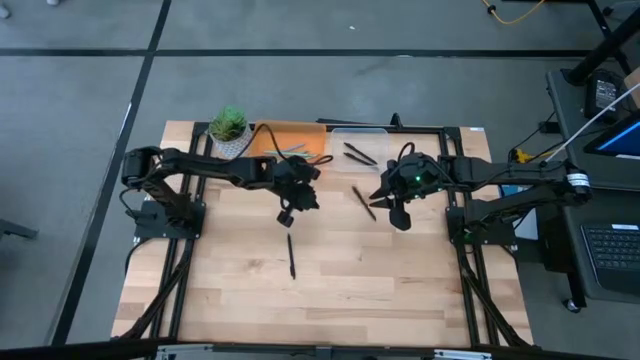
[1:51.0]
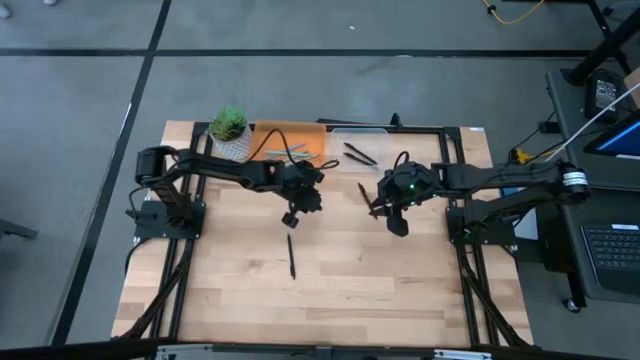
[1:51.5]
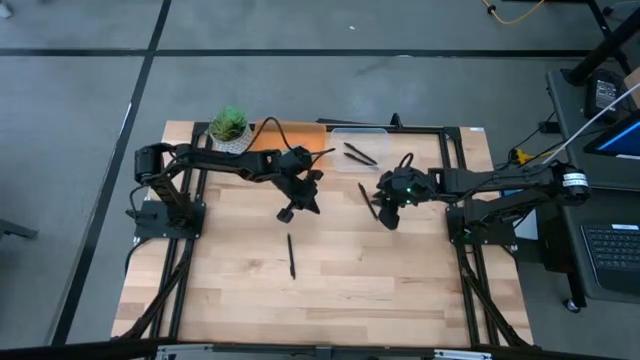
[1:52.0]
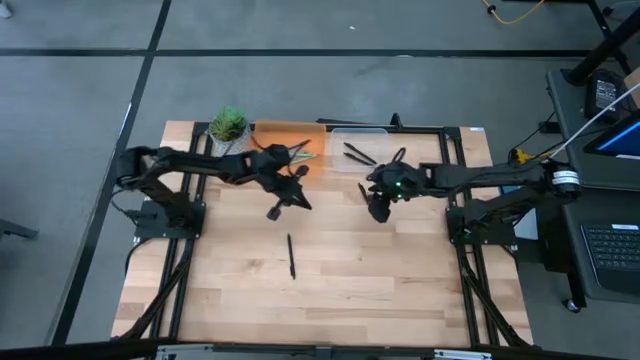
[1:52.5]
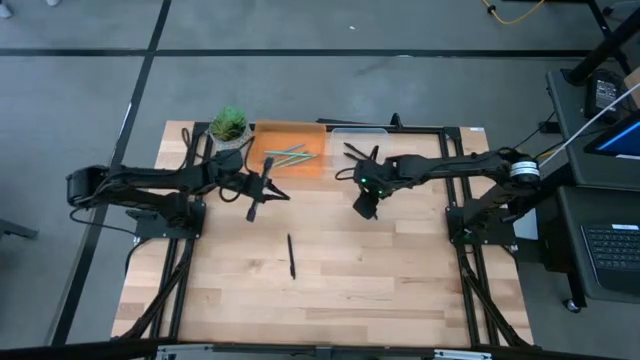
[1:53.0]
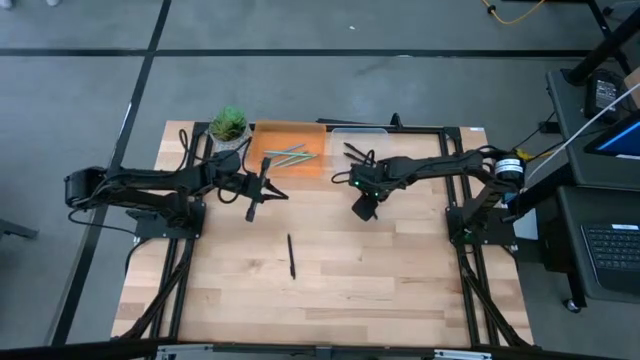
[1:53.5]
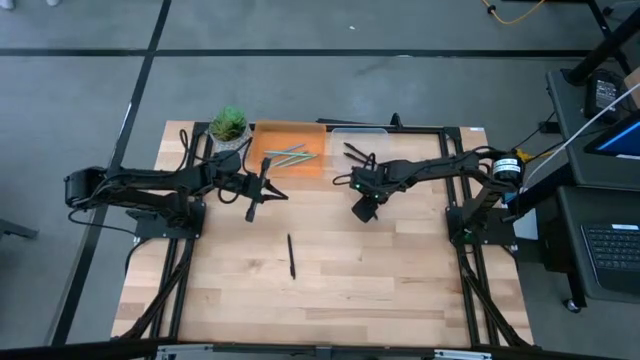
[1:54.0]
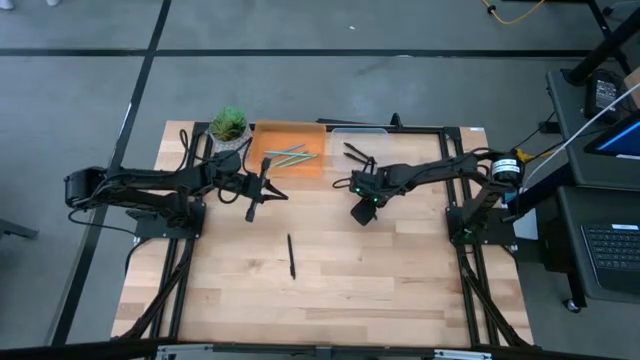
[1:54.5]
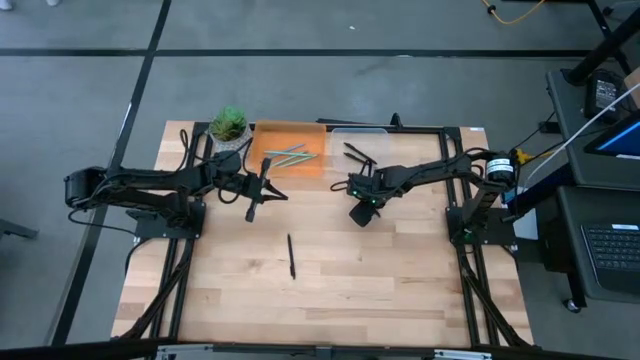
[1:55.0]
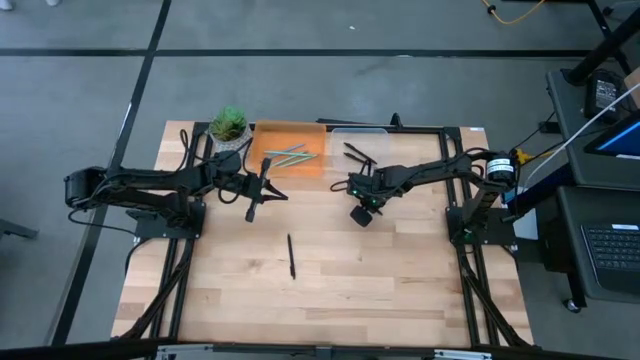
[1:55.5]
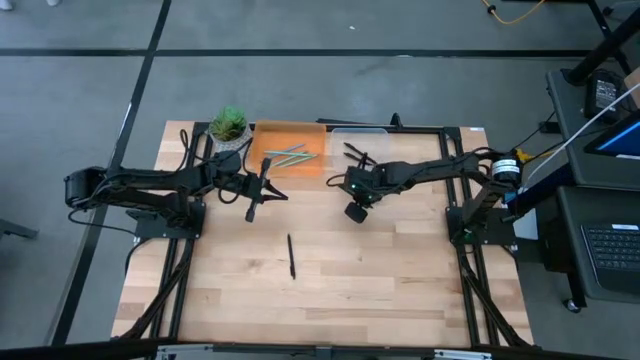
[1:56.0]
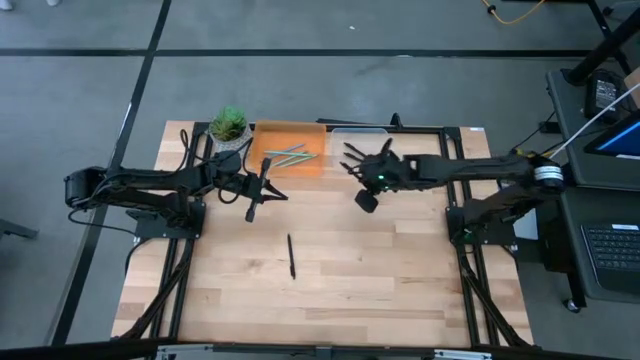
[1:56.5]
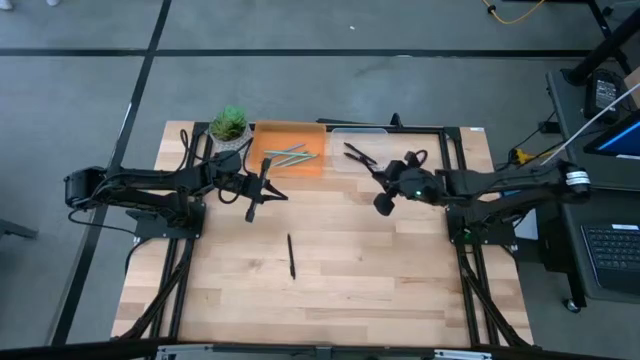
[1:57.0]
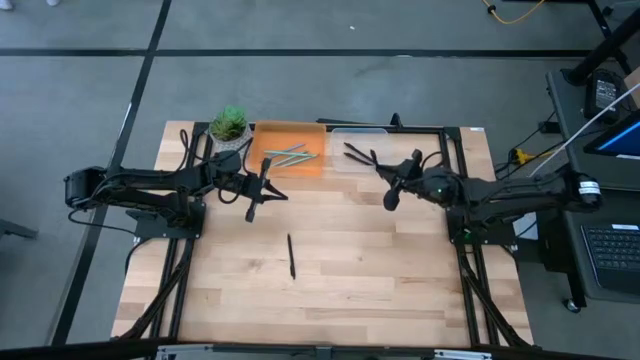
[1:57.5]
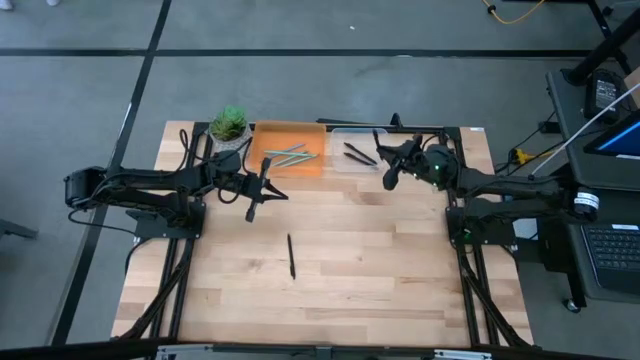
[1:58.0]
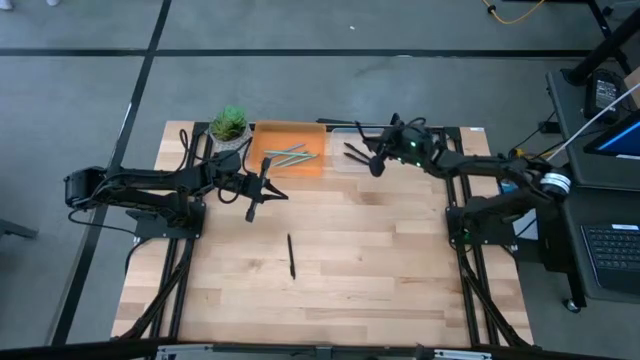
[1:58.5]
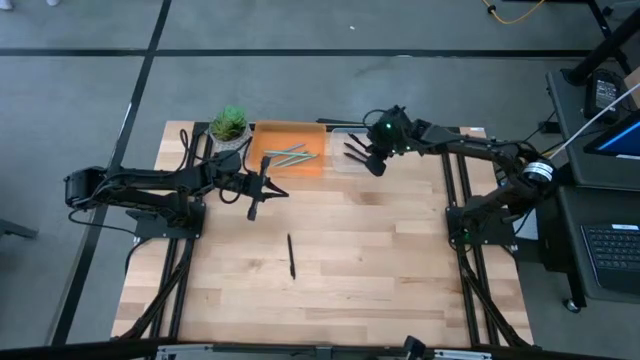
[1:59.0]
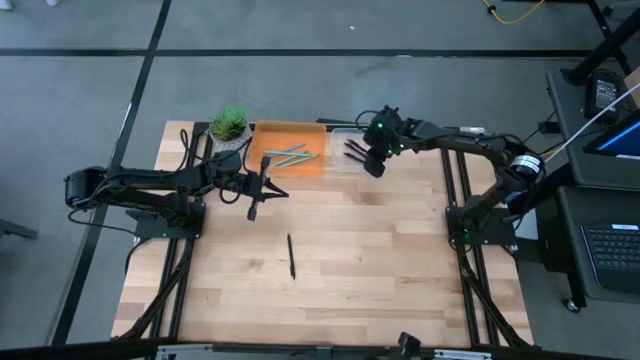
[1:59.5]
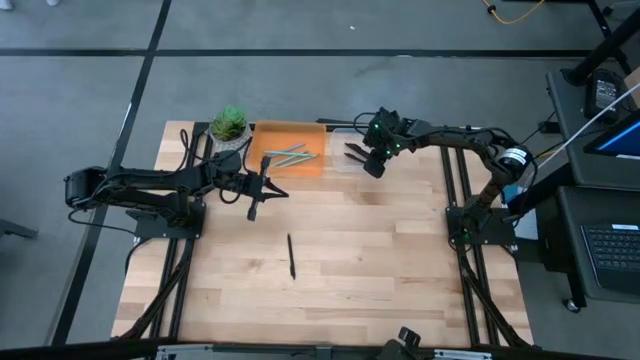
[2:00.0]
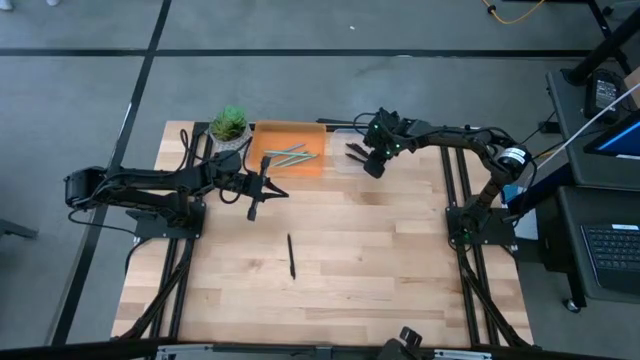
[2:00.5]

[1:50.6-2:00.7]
Task: Sort pens & pencils
Put the black pen into the transparent bin

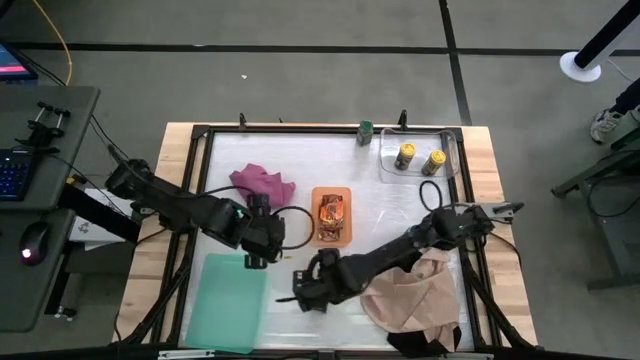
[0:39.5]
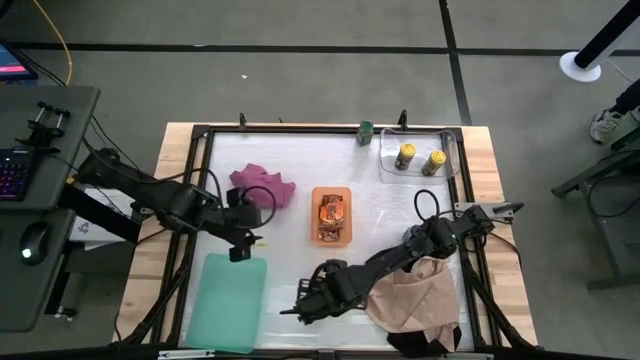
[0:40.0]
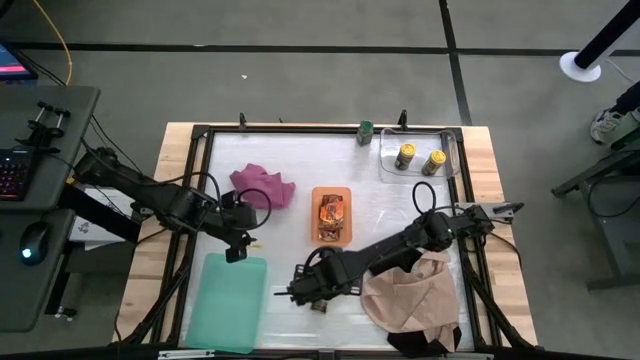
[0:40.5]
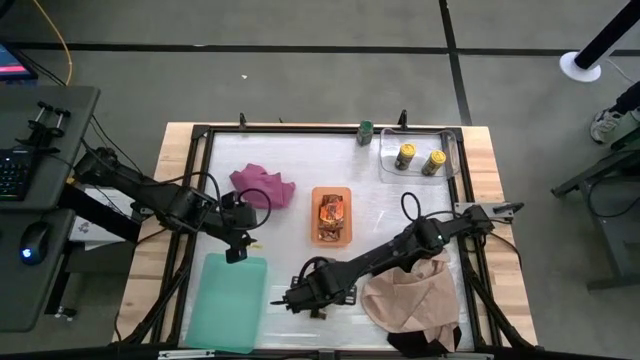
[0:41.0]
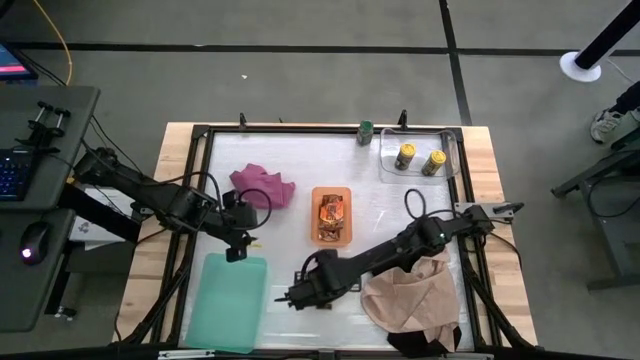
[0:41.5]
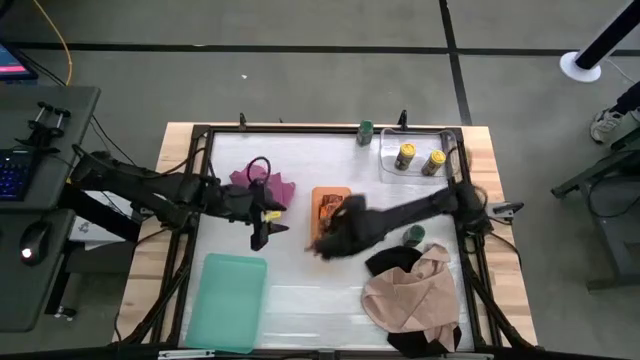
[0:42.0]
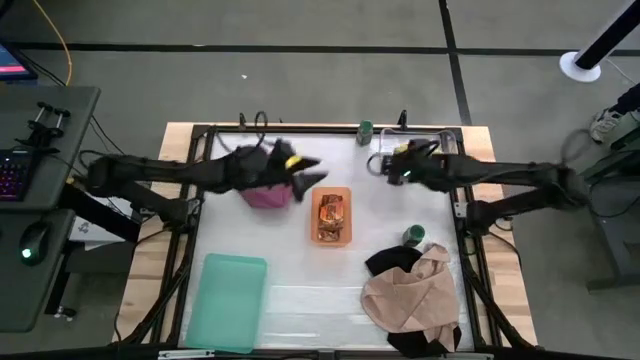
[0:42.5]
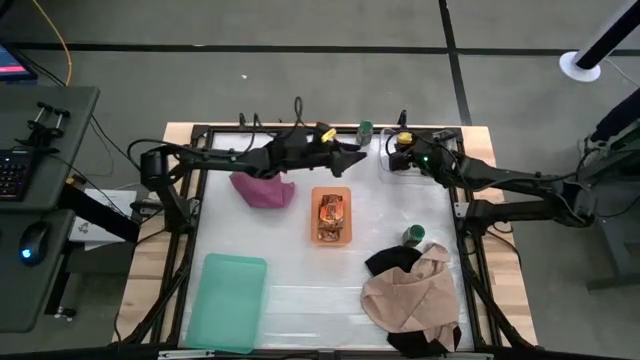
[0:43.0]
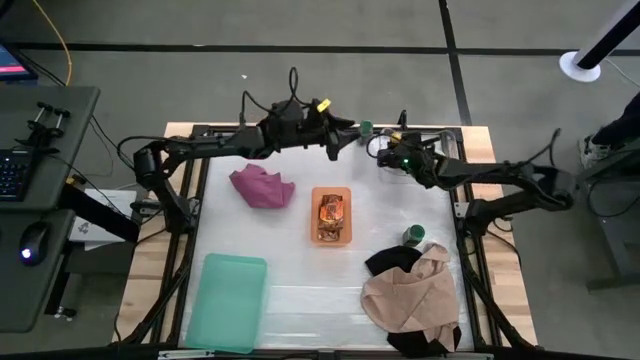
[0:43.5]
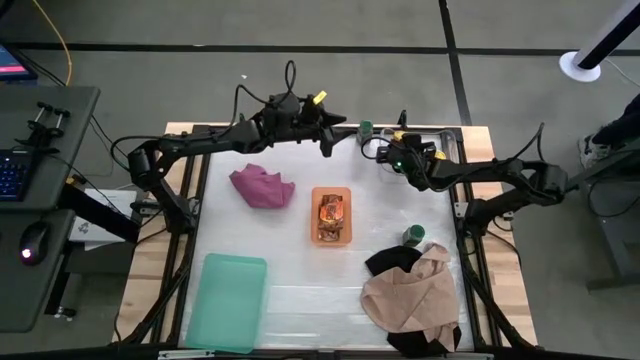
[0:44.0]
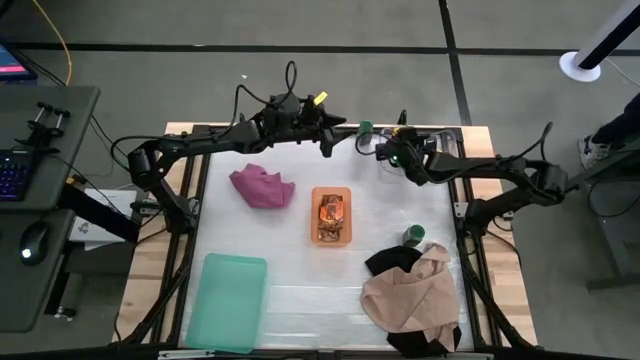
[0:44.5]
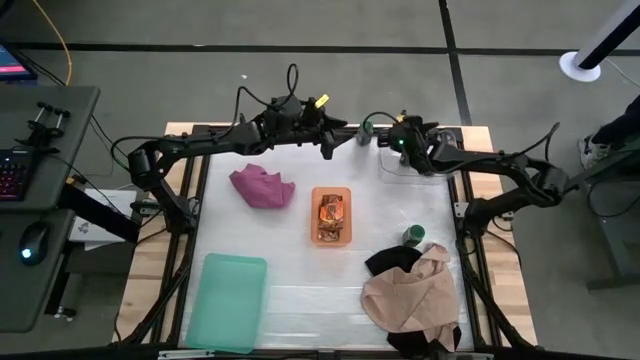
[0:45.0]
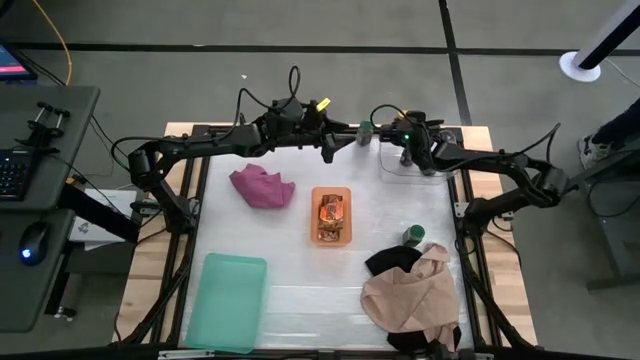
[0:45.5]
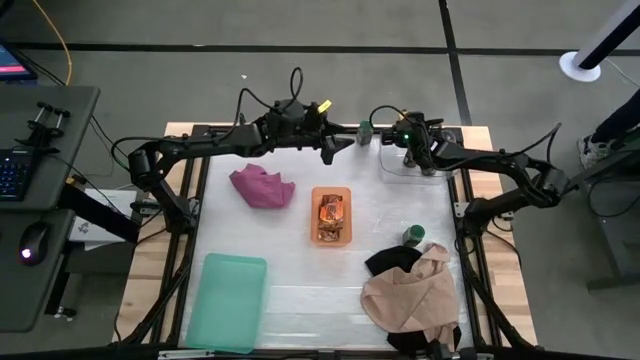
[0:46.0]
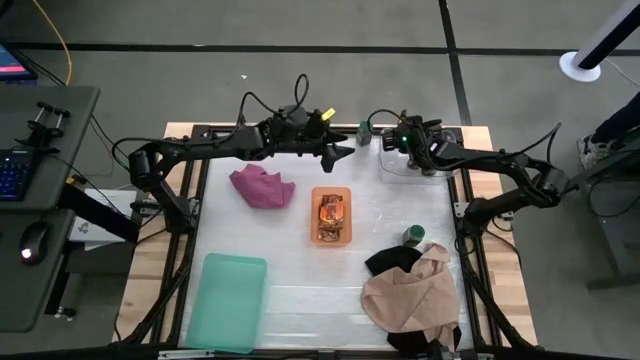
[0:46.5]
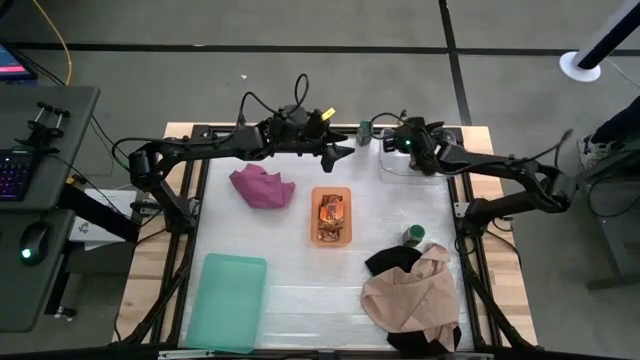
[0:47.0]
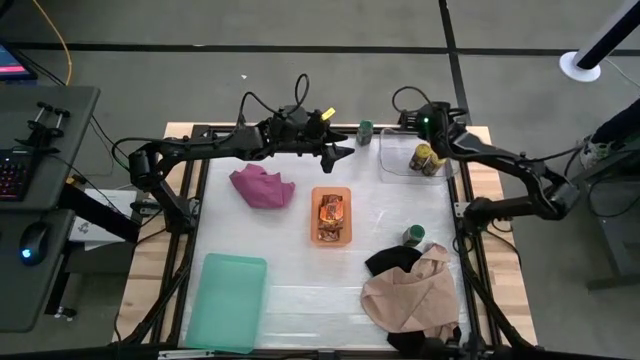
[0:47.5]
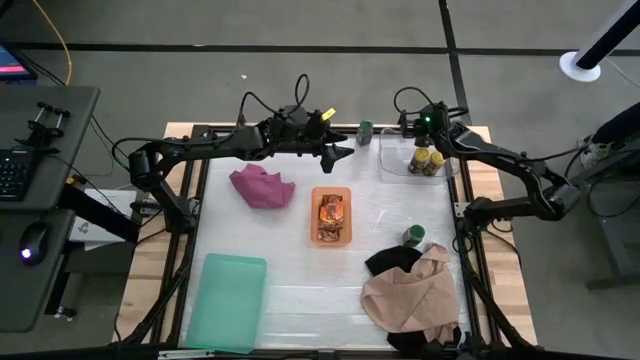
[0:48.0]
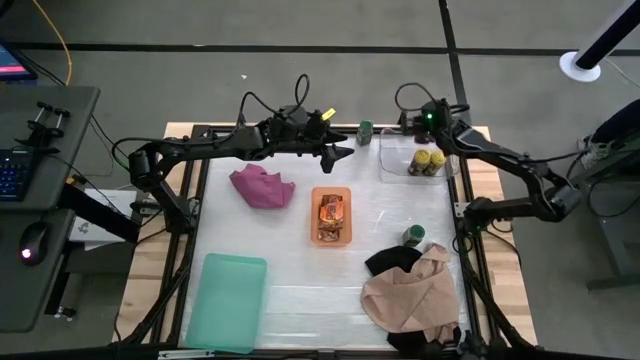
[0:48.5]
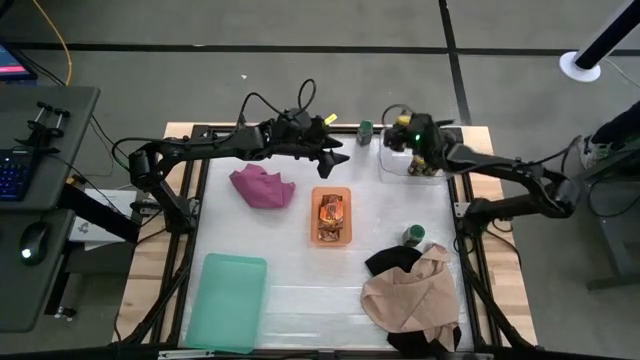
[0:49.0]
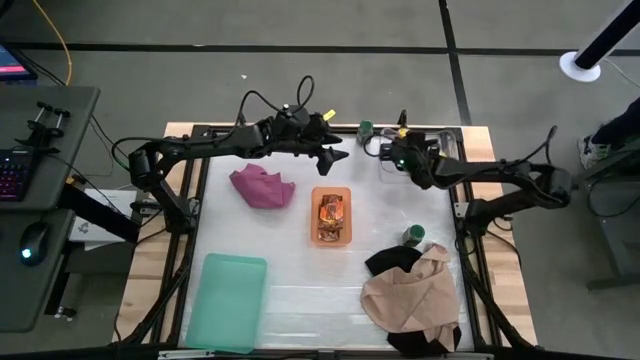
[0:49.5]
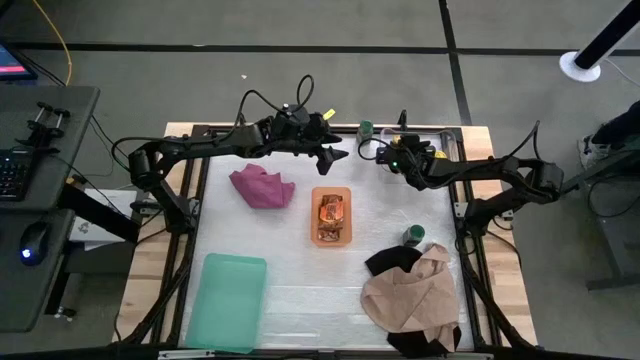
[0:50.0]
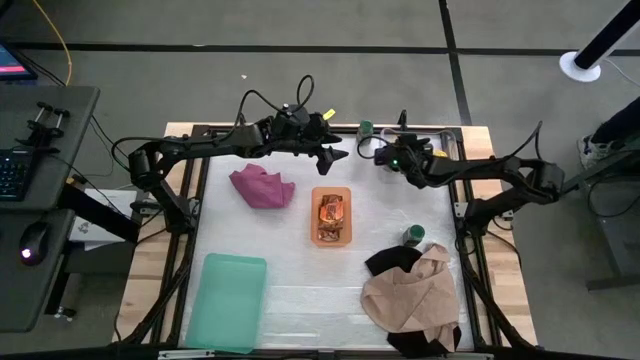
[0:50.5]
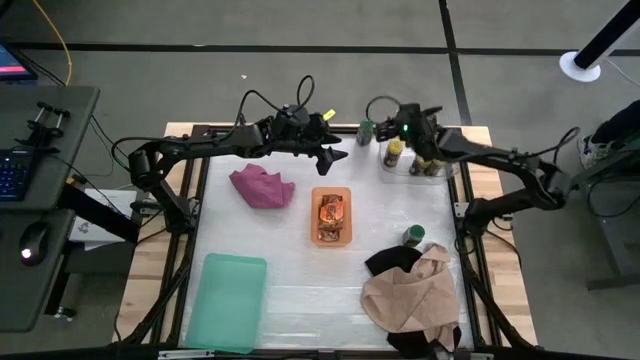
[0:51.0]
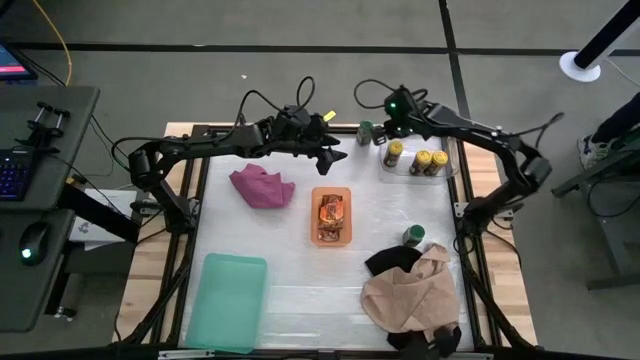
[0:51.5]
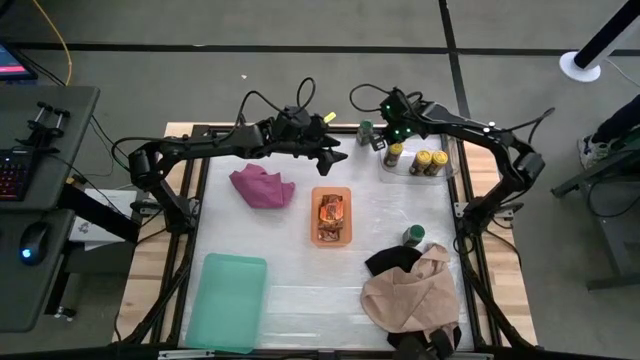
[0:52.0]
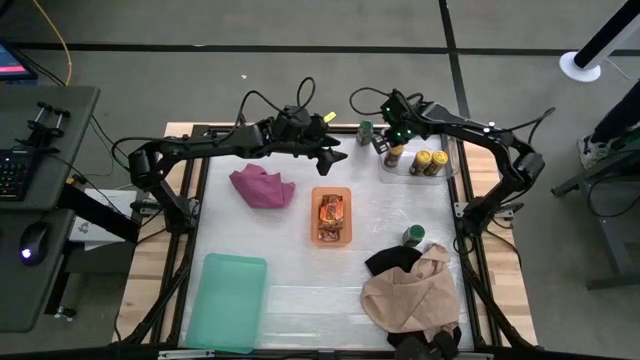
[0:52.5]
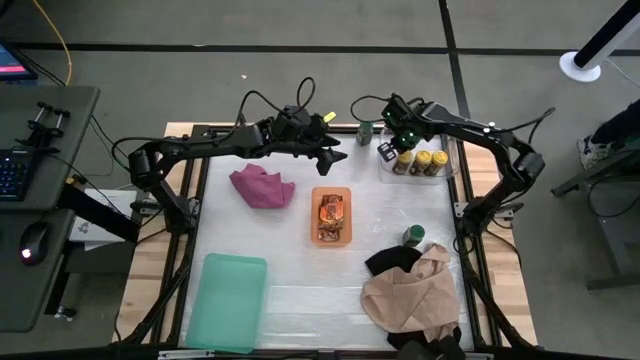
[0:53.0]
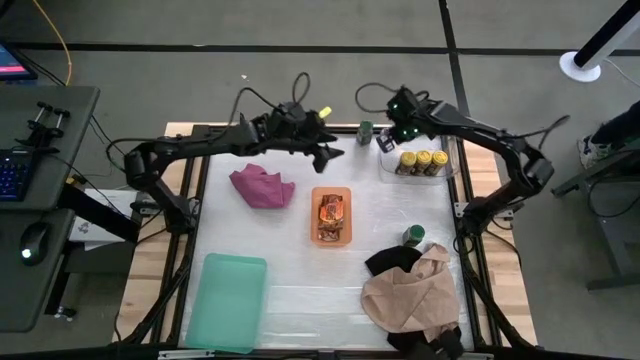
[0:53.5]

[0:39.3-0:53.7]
Task: Sort spices by type
Put the yellow seasoning bottle into the transparent bin
